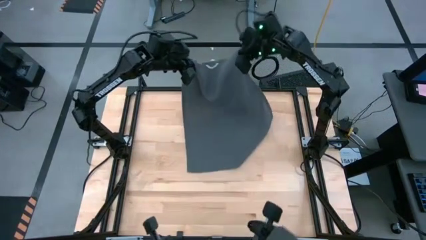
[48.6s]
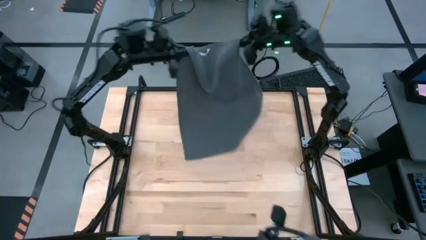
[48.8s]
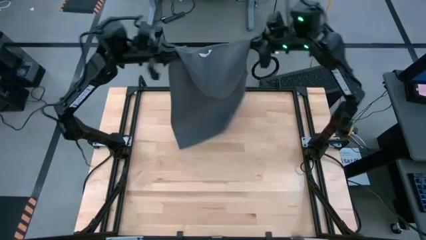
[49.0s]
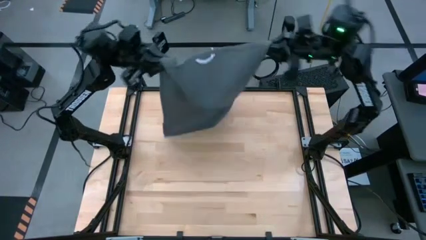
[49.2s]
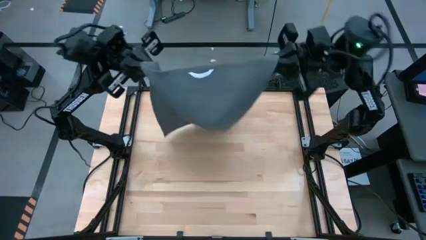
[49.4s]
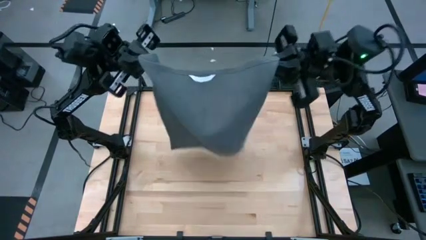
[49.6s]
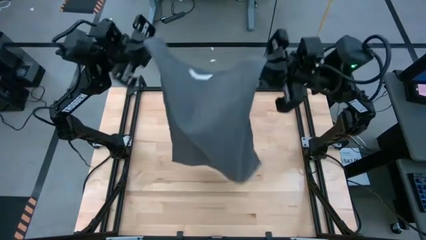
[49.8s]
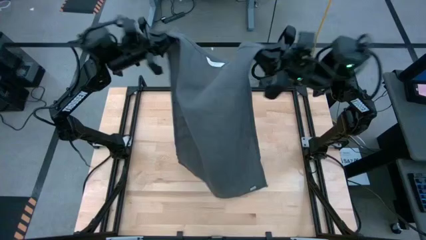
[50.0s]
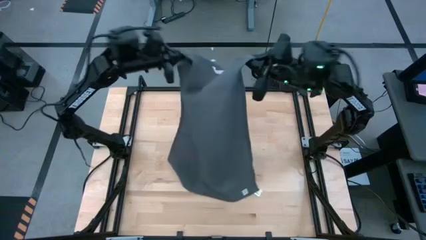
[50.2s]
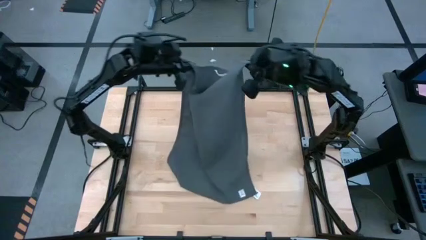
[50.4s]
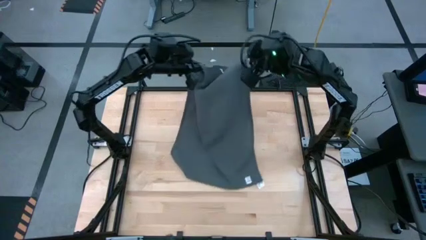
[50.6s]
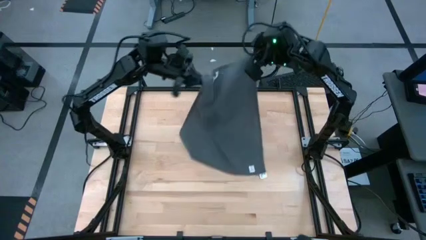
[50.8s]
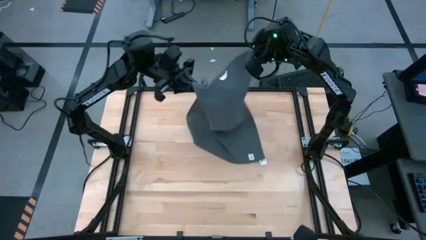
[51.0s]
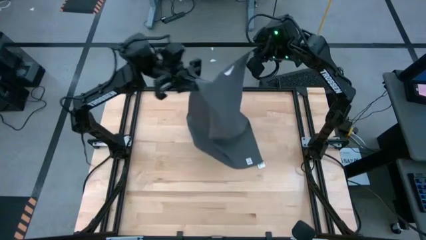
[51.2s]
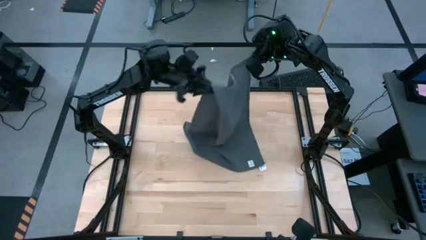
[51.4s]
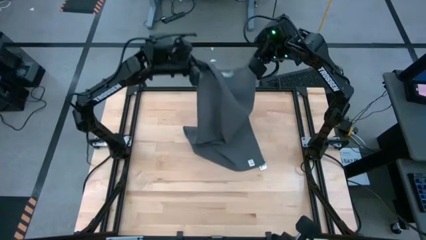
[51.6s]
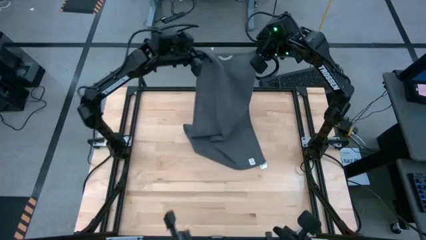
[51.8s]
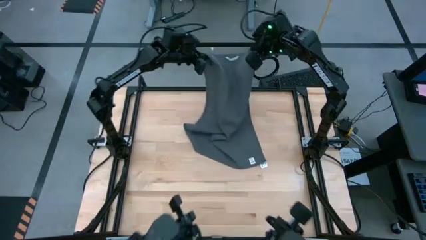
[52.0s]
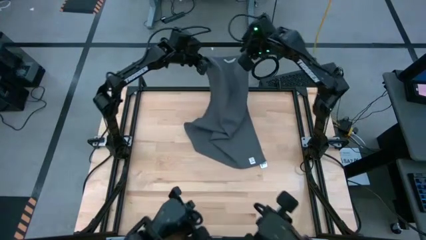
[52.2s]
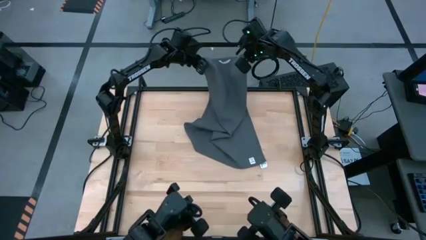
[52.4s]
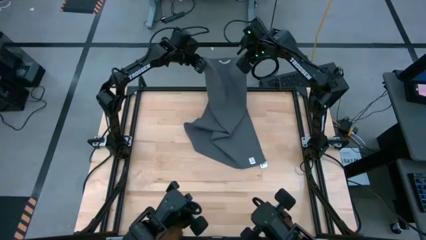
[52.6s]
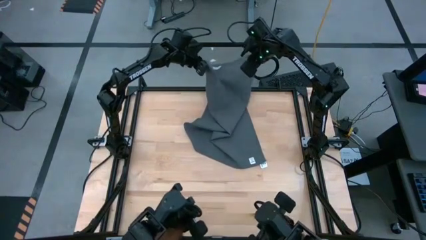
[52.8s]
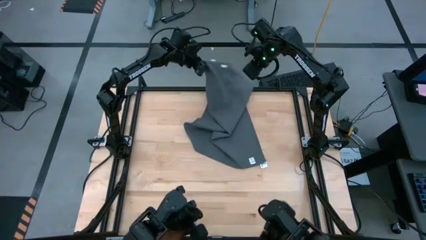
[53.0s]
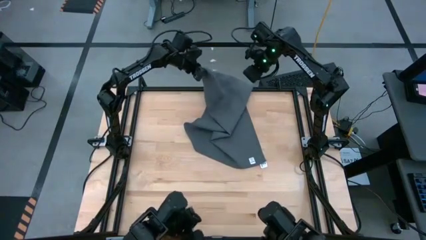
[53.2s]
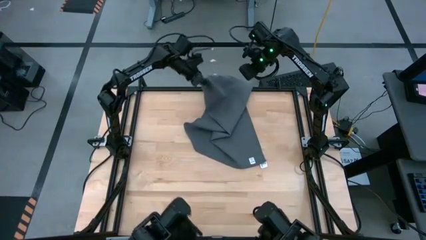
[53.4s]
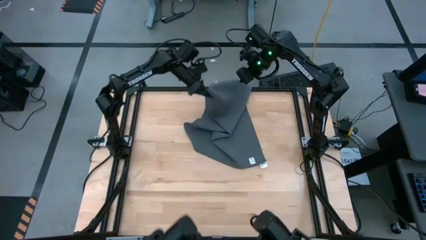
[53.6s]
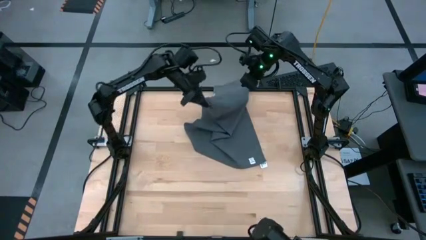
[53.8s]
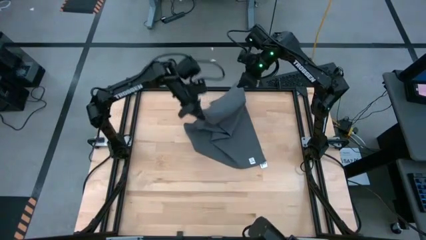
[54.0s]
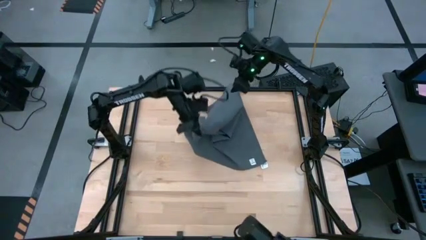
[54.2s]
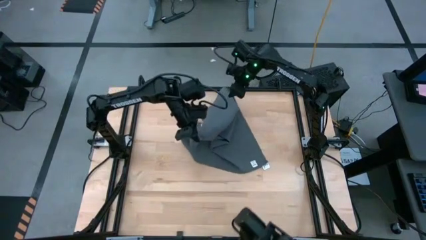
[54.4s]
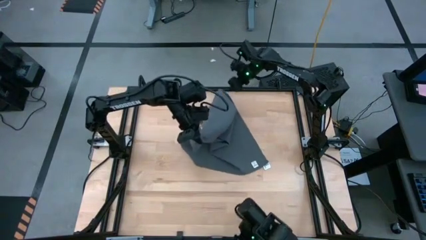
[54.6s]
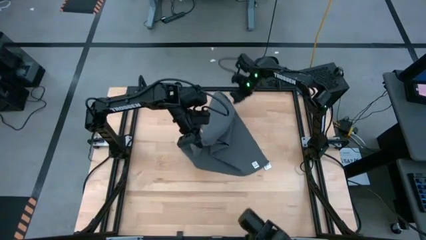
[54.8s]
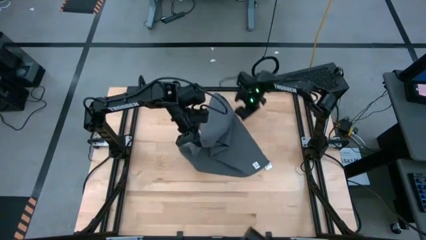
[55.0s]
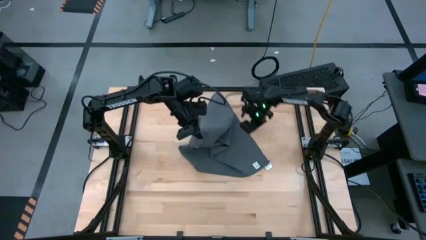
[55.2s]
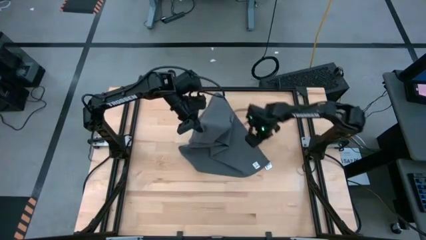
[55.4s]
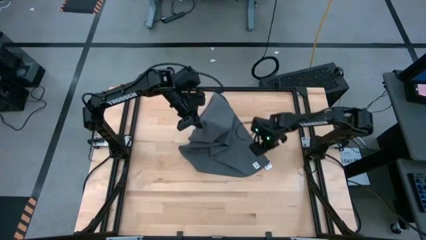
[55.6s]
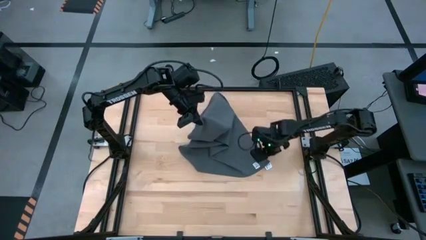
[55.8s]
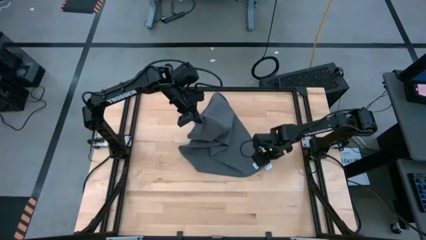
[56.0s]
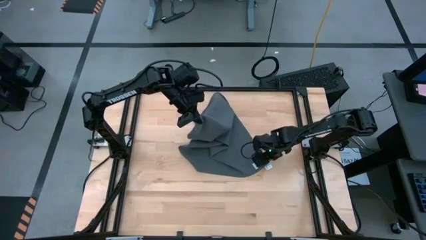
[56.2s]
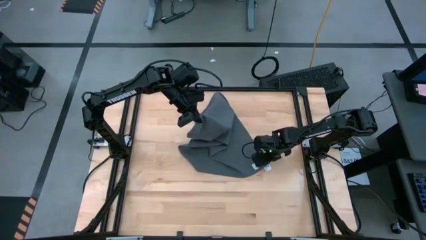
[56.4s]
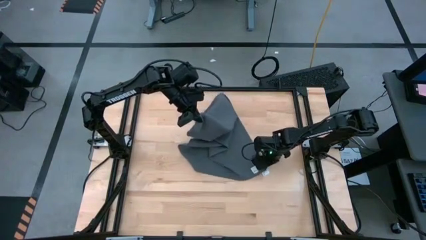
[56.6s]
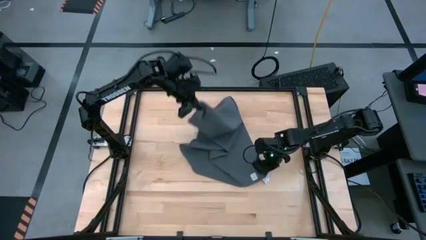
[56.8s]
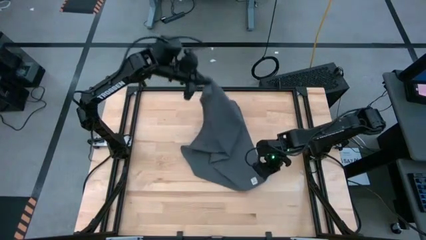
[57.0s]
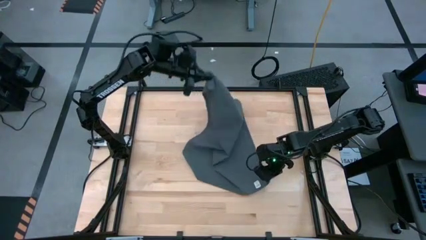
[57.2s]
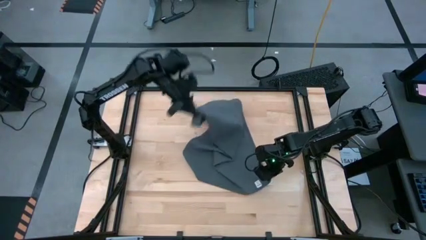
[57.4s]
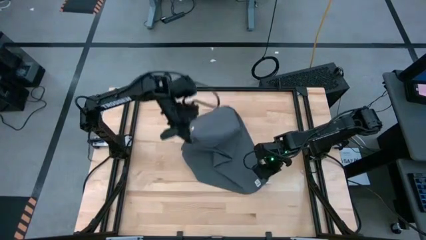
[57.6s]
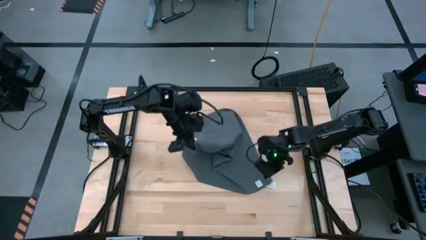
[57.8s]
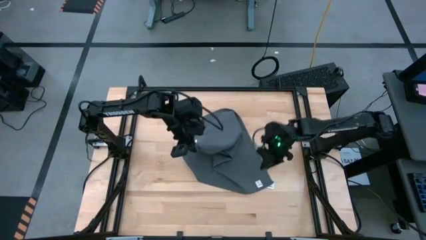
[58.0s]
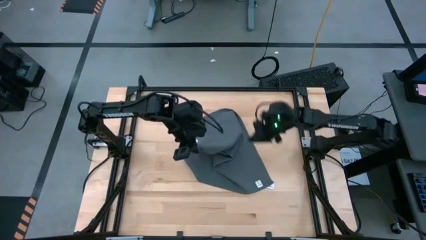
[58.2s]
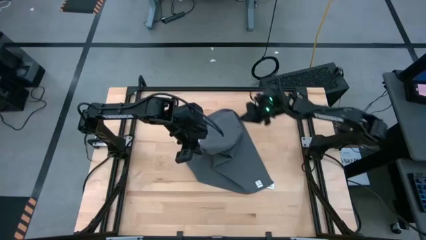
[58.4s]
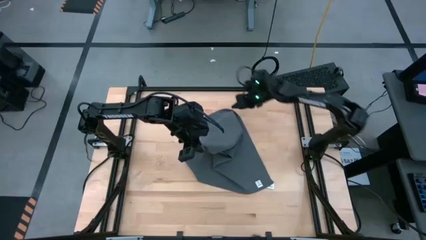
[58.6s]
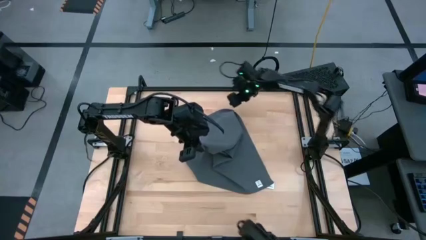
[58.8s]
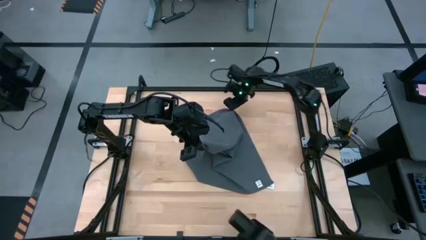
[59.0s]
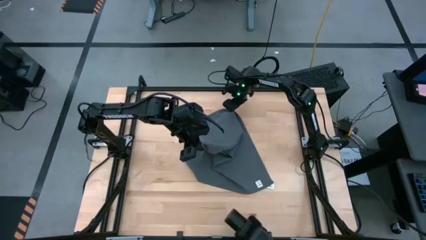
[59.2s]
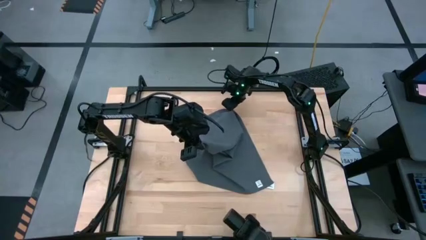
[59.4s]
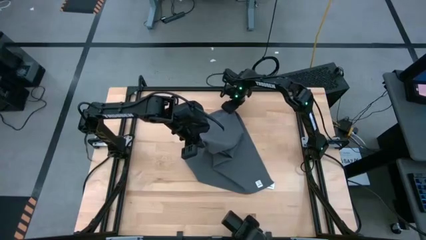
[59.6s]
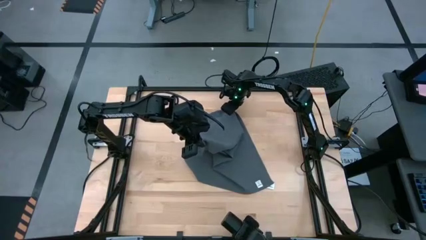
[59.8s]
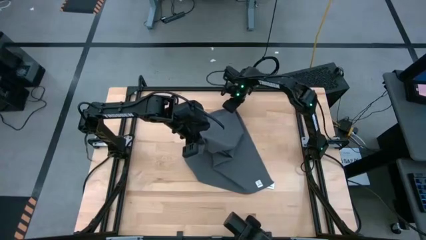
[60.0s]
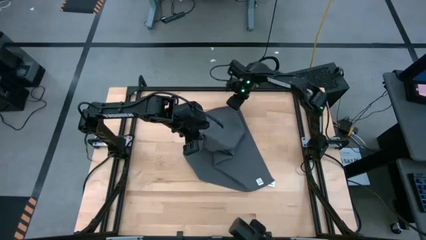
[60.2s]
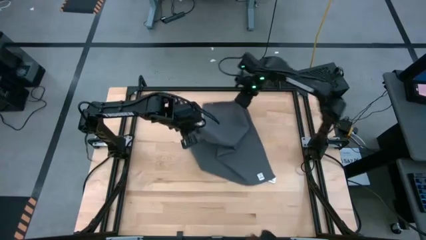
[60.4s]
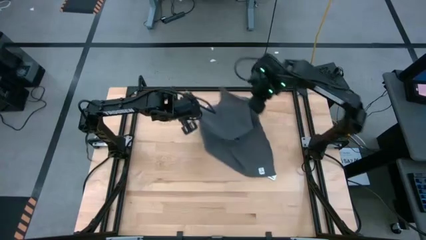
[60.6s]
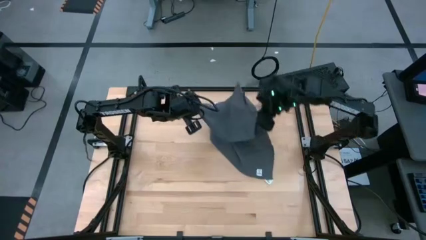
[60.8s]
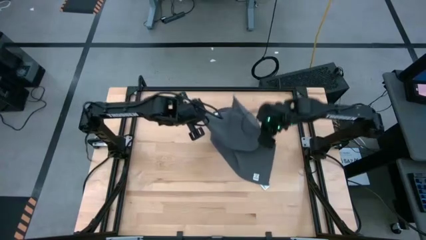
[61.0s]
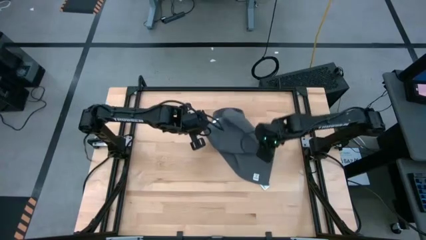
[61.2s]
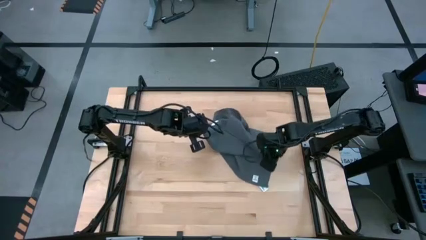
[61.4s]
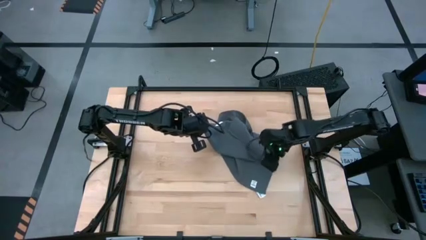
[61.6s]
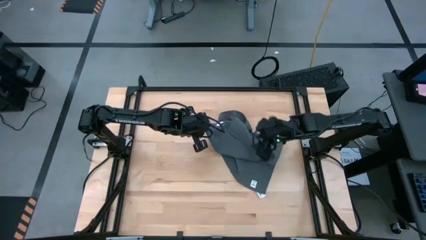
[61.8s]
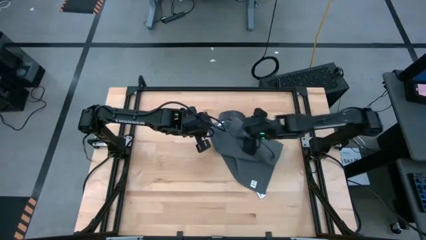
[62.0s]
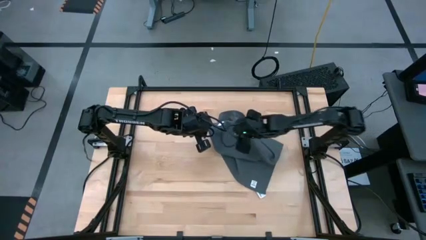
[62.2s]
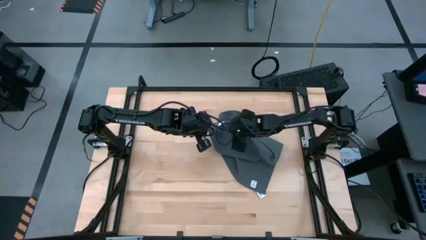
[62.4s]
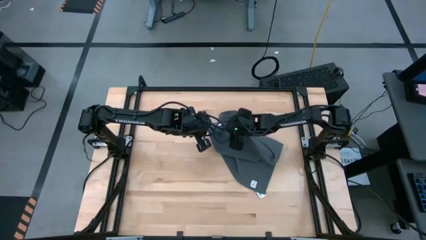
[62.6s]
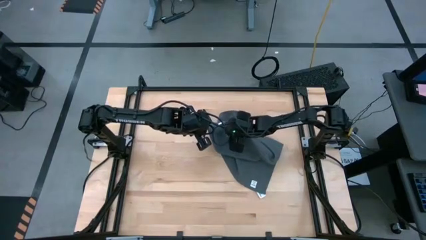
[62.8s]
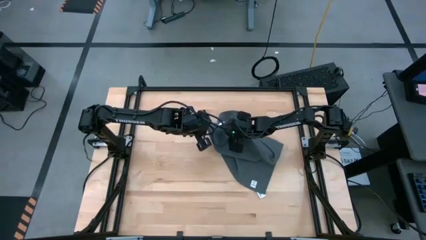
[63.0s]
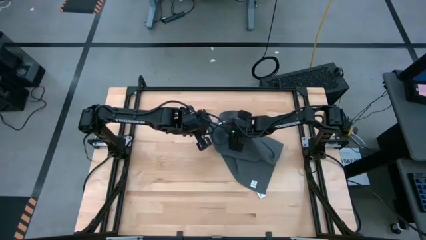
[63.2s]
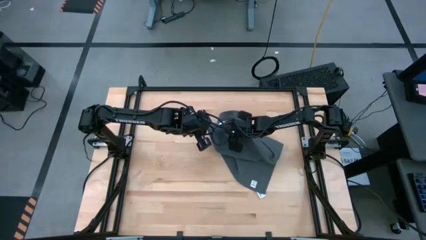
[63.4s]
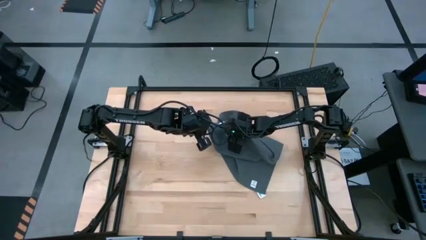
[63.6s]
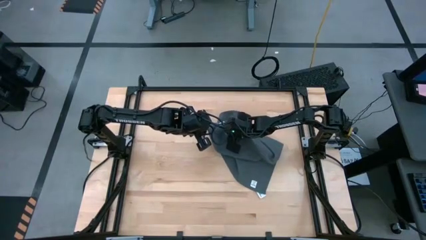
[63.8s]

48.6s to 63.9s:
Task: Roll towel
Fold the gray towel on the center of table
